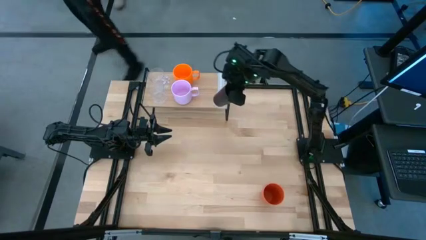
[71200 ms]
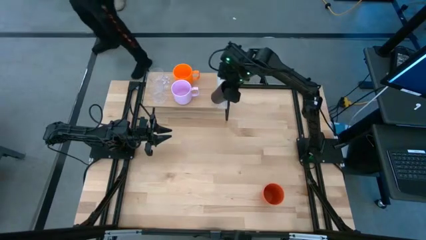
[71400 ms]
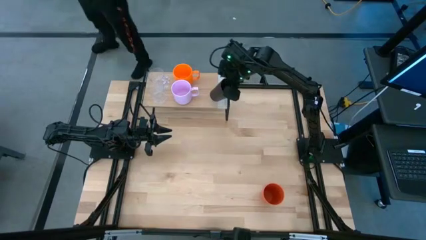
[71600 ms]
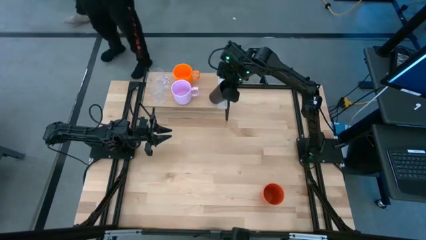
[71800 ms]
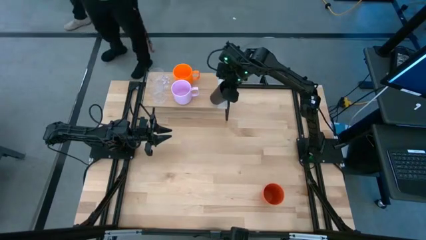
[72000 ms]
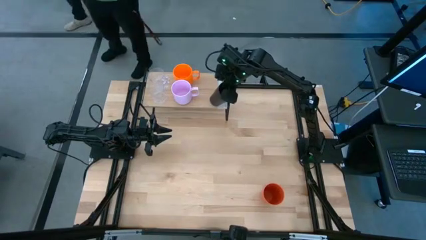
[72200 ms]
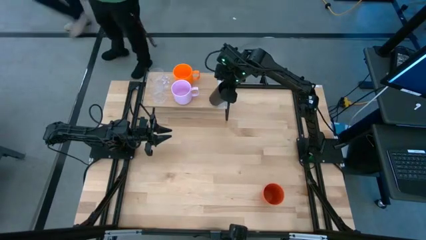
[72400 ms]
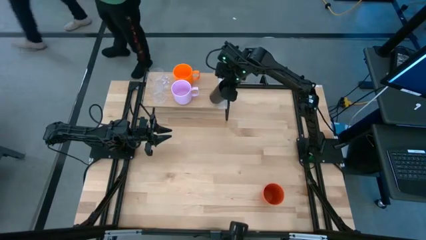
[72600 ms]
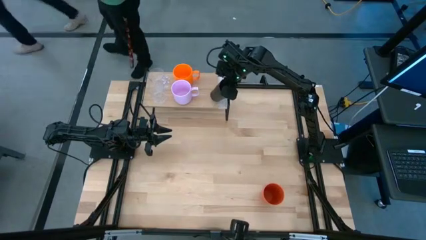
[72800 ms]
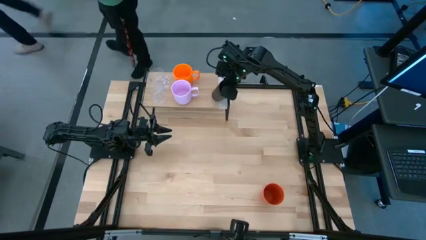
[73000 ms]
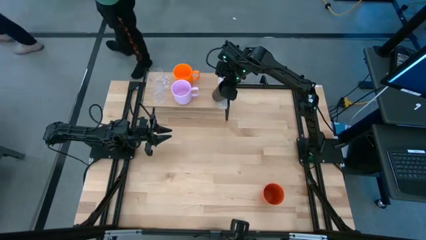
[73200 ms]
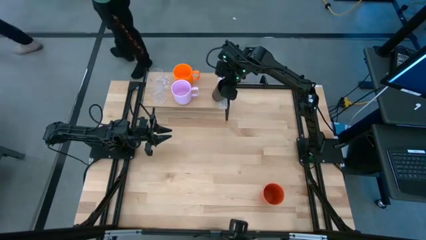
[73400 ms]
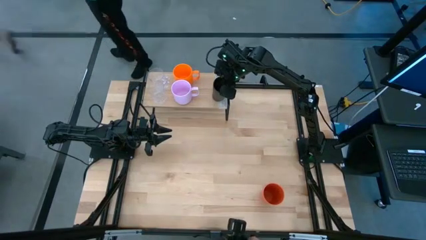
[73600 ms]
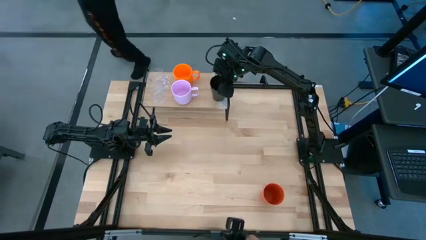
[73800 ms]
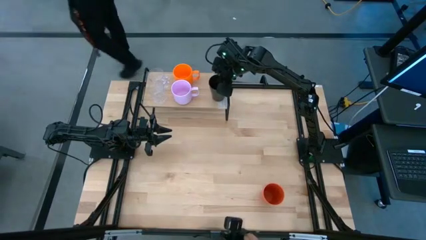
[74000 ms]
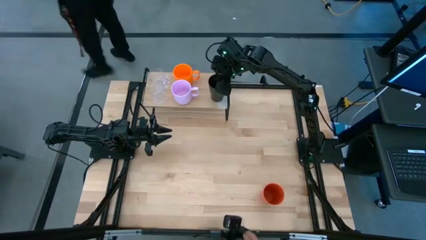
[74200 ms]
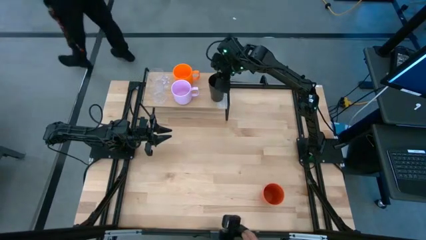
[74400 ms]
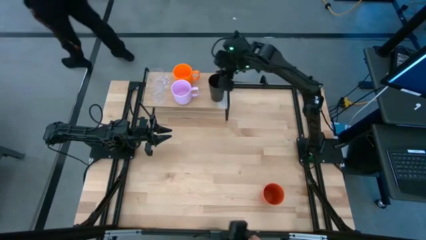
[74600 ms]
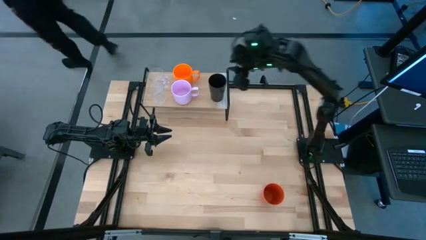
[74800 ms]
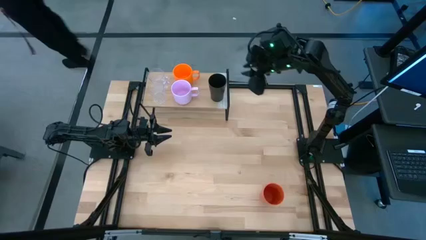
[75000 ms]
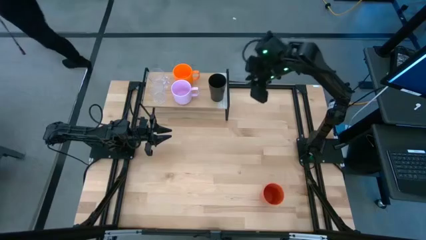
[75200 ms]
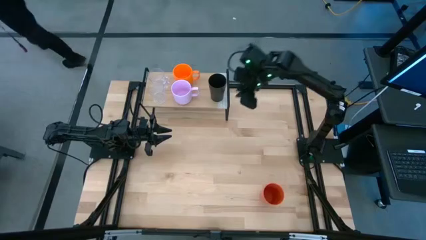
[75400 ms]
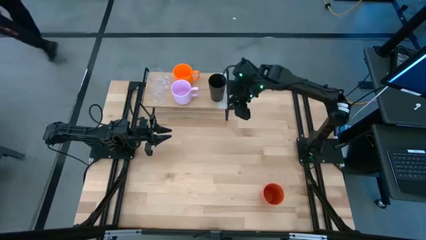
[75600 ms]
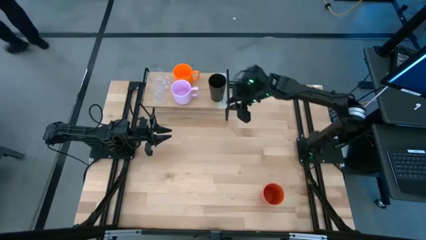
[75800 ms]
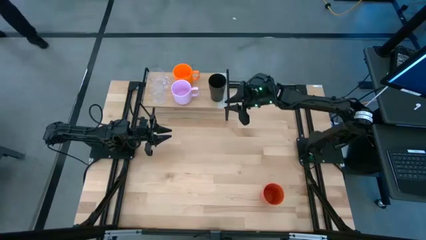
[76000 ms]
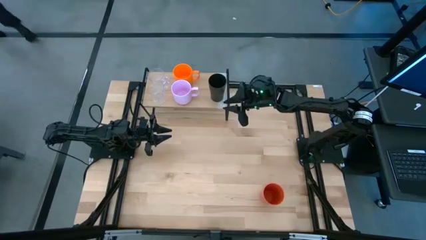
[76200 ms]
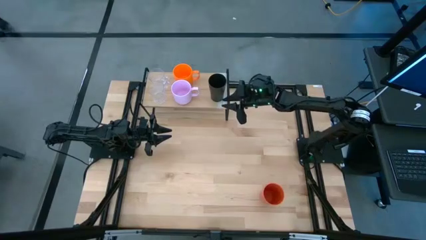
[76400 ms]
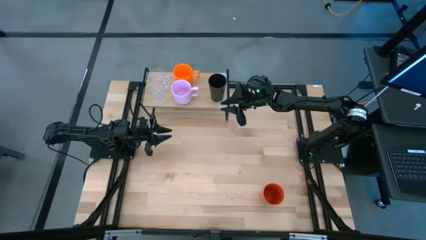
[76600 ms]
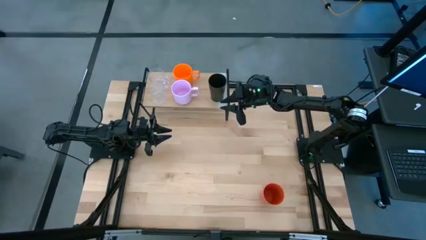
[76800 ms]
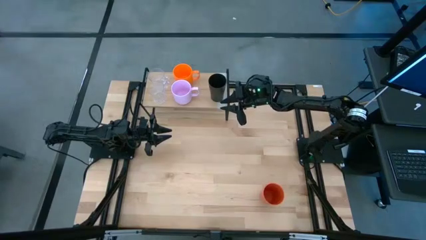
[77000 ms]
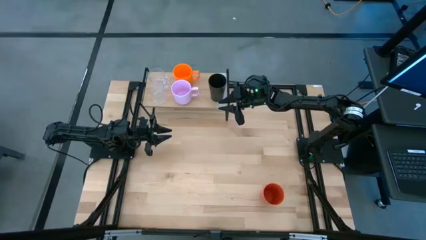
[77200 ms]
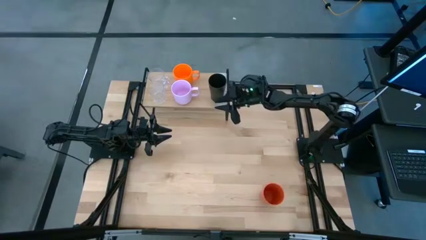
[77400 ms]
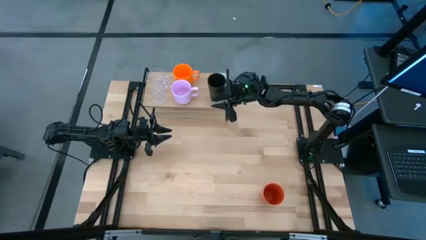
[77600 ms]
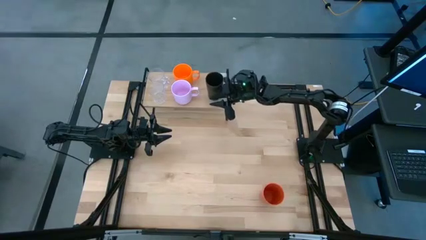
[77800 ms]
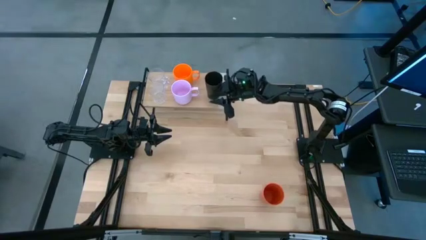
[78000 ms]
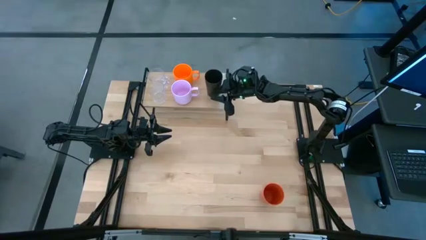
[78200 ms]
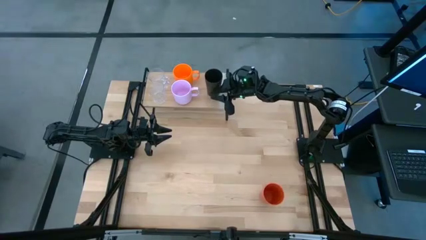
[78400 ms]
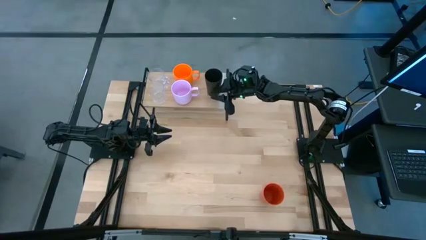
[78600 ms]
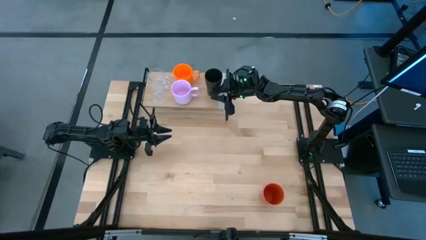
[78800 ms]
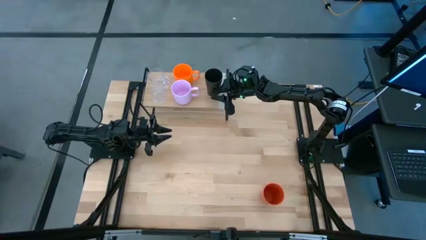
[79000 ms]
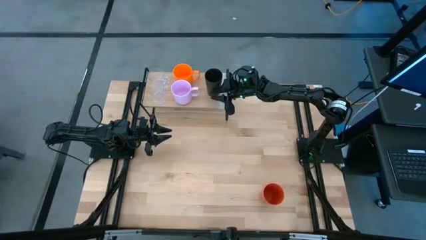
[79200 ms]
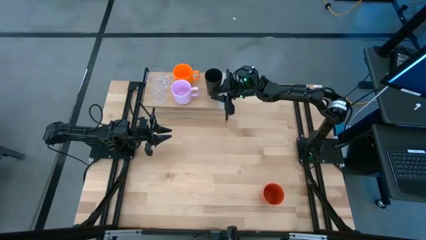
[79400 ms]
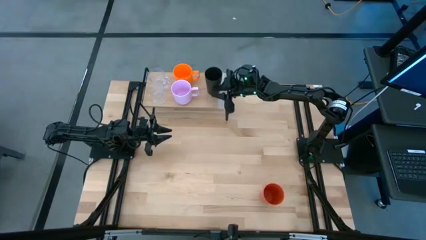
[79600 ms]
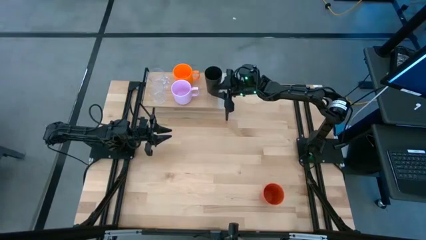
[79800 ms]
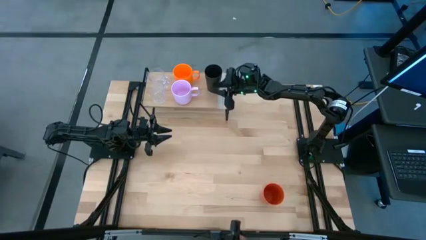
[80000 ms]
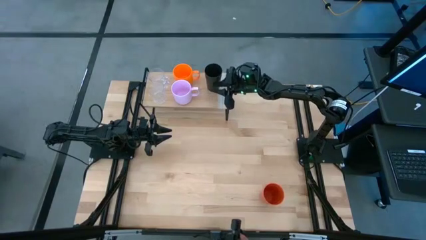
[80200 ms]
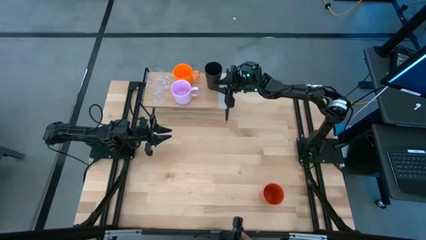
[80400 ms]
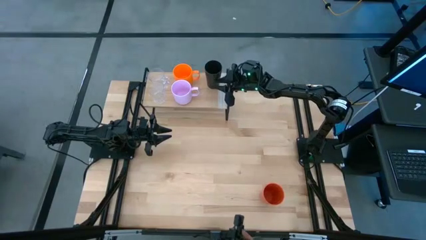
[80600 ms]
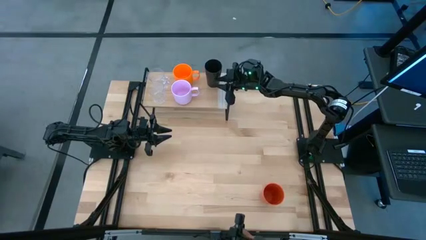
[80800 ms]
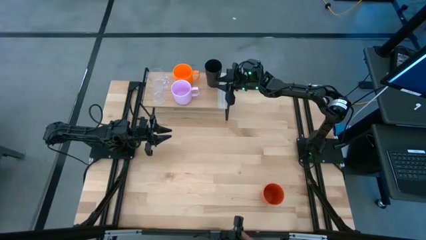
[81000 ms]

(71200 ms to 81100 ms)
Task: Stack small to large cups/mugs on shelf
Put the black cup on the shelf

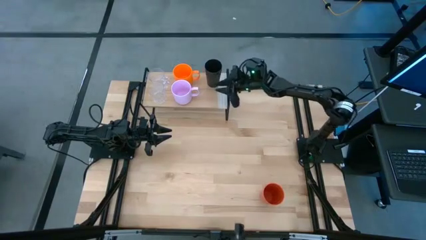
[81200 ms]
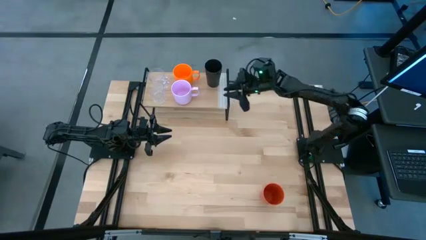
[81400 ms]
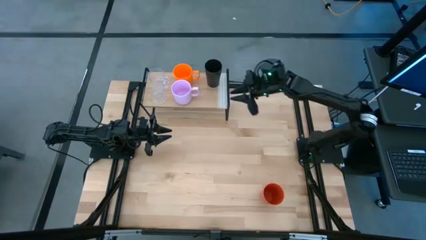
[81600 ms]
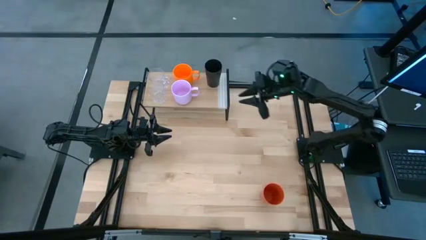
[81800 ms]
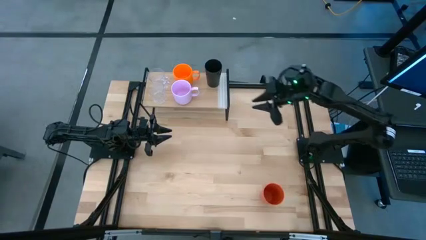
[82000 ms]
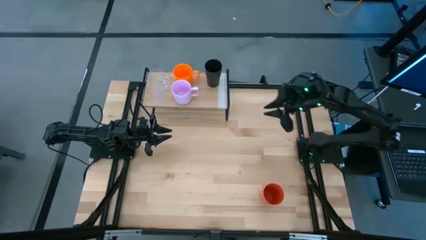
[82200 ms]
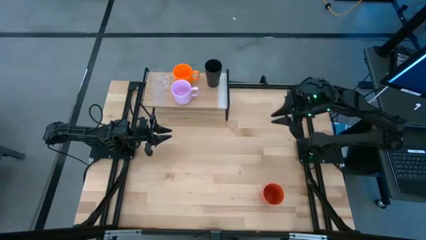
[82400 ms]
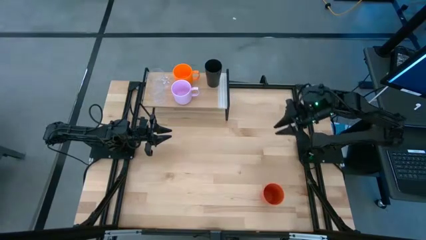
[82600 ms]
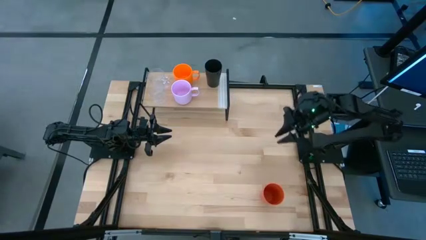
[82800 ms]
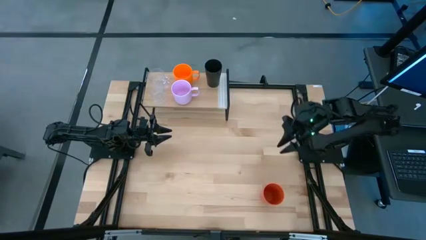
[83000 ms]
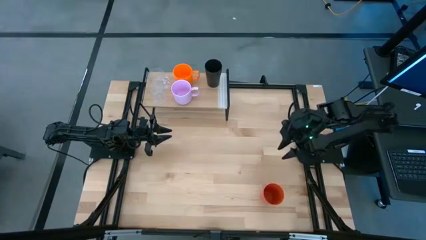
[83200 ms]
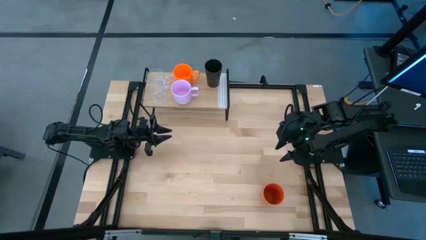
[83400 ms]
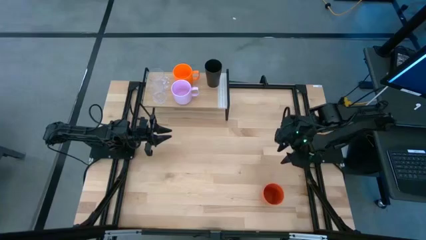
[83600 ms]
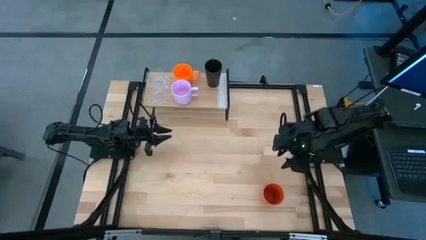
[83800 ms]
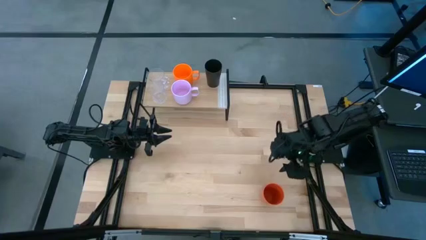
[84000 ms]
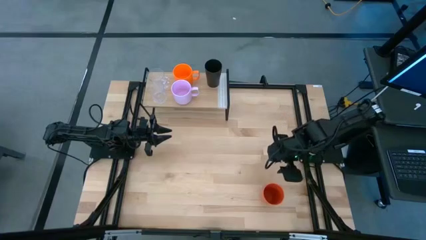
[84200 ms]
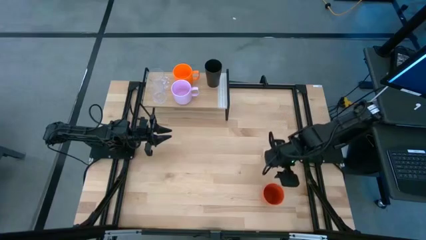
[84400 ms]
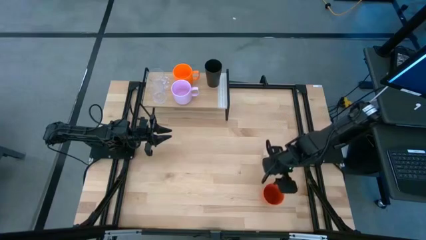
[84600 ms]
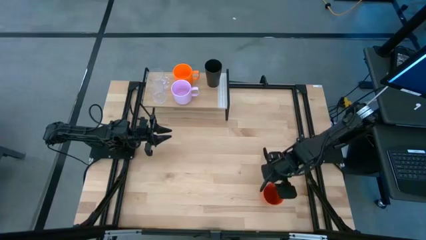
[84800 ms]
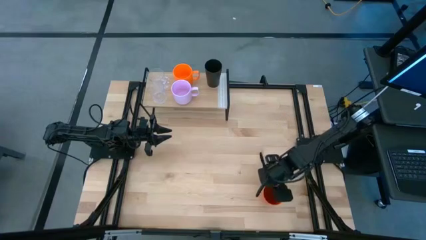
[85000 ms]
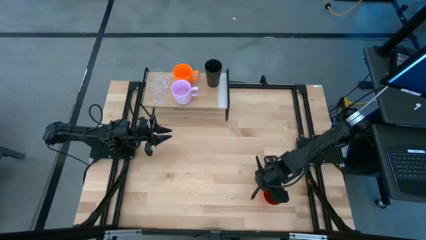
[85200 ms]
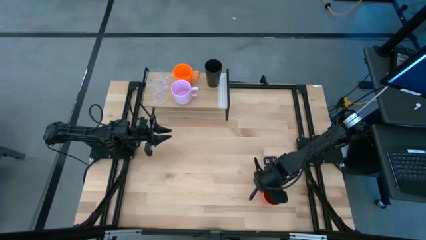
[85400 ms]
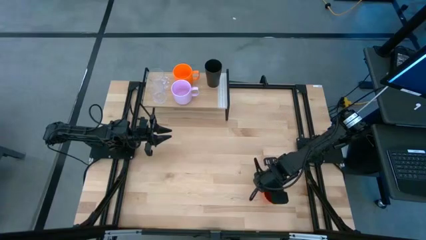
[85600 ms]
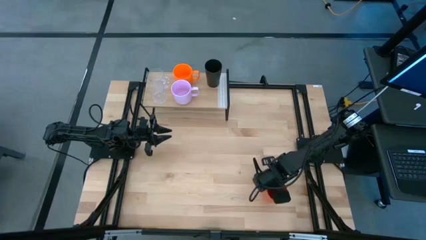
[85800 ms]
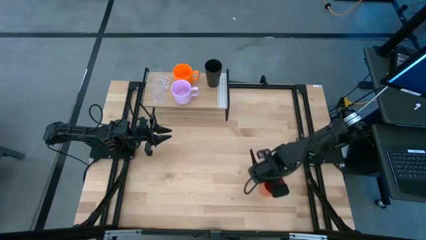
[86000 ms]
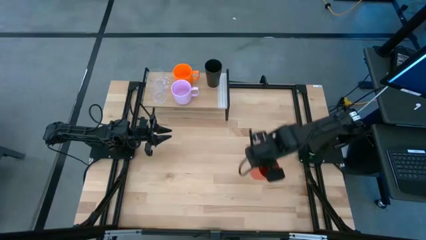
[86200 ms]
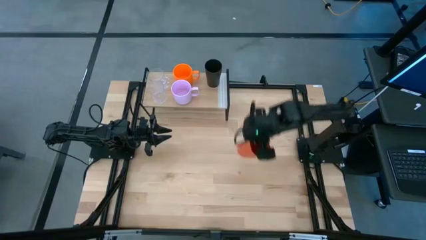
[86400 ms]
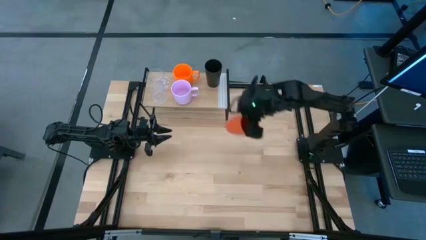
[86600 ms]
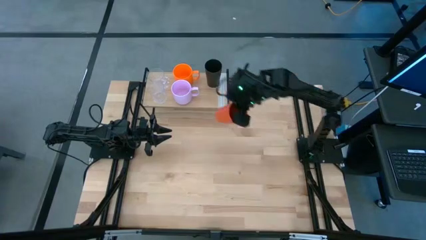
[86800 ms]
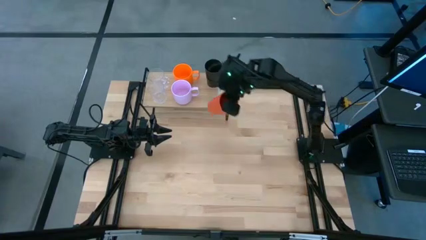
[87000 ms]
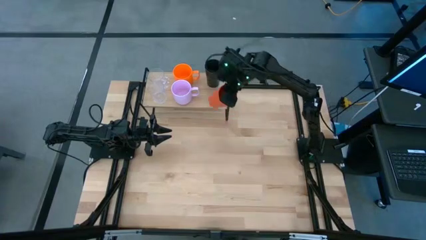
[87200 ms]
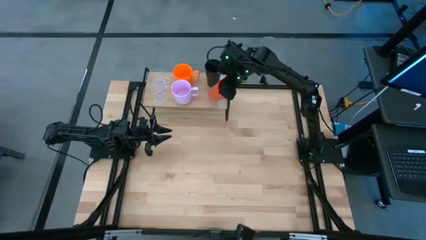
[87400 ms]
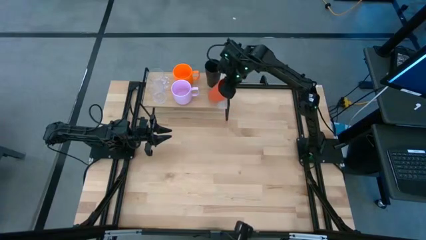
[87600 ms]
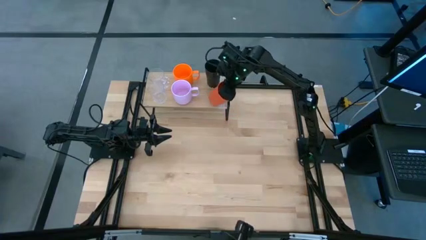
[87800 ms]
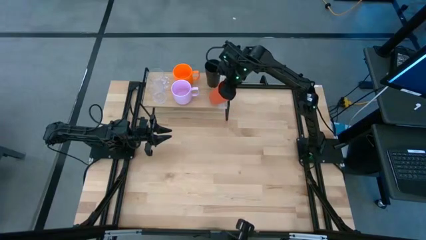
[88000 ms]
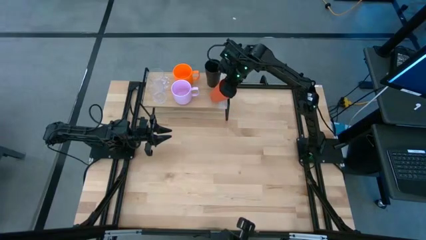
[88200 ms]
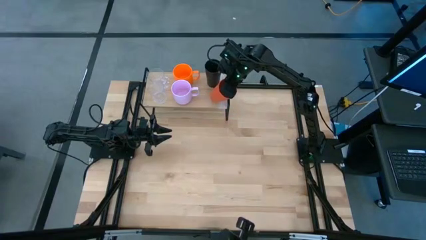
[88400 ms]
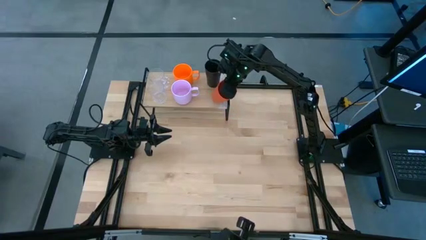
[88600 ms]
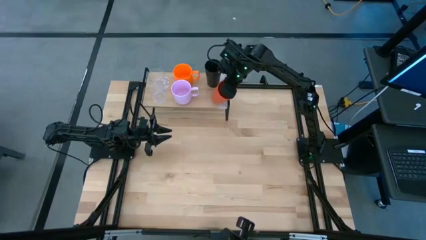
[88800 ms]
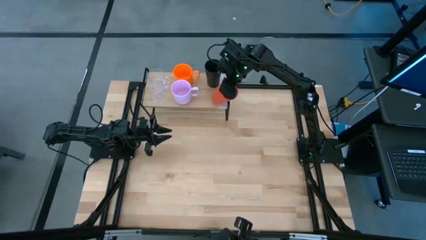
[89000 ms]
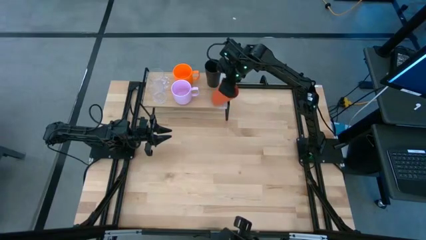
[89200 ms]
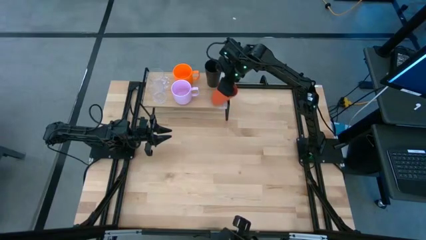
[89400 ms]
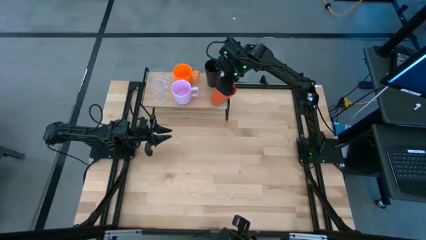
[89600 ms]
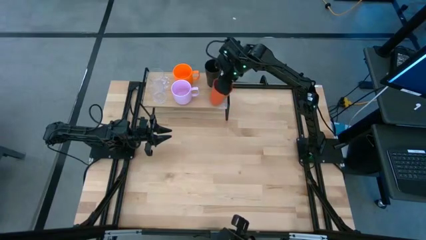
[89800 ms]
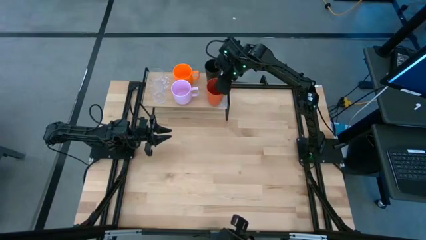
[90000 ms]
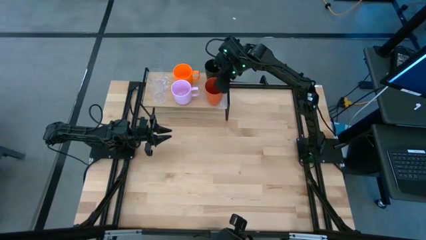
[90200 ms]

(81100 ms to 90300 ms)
Put the orange cup on the shelf
